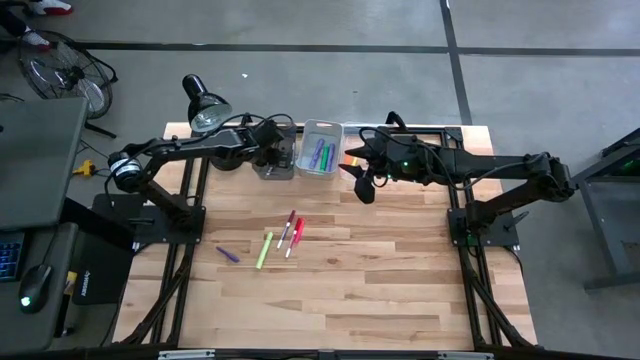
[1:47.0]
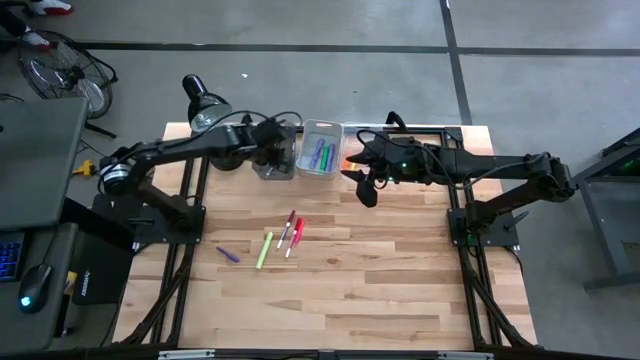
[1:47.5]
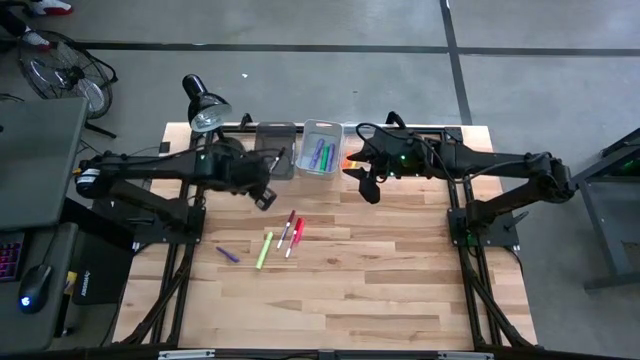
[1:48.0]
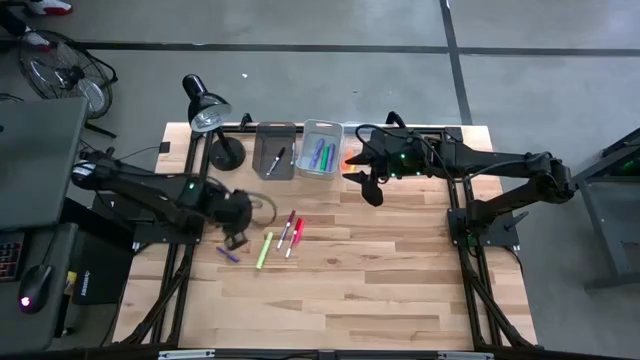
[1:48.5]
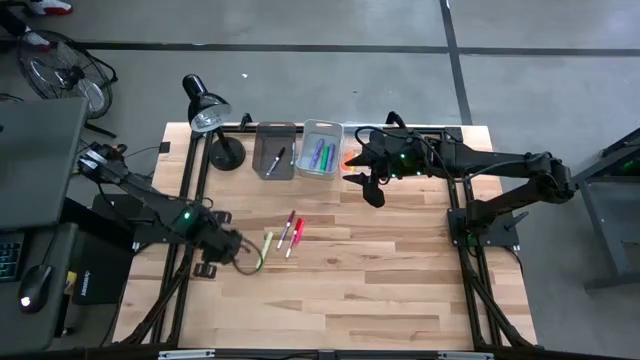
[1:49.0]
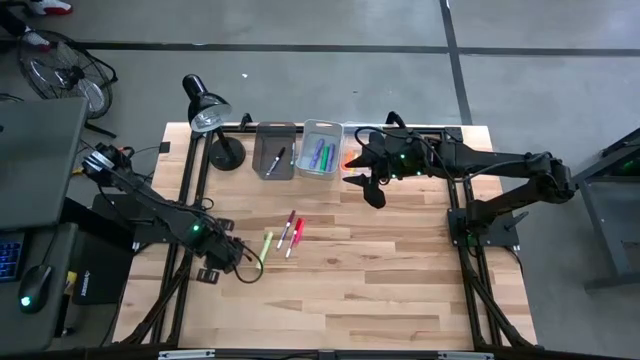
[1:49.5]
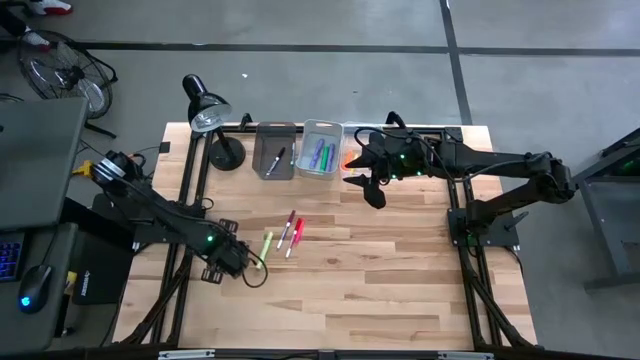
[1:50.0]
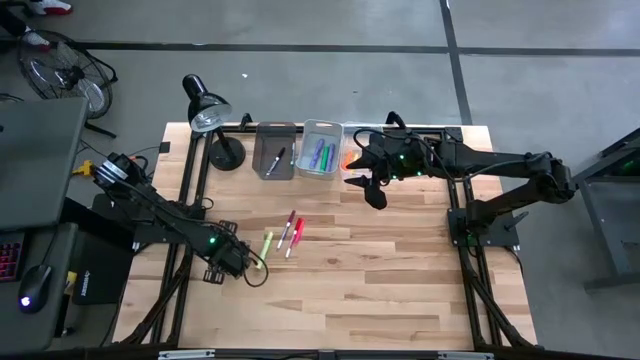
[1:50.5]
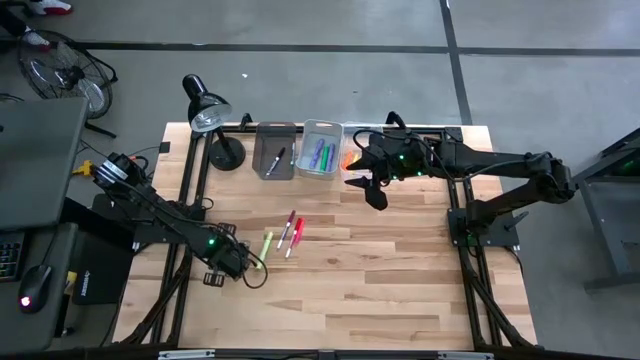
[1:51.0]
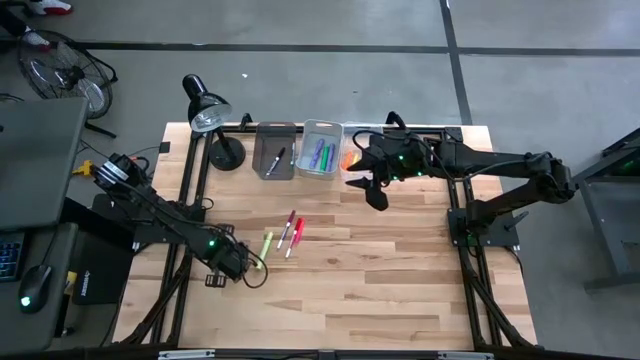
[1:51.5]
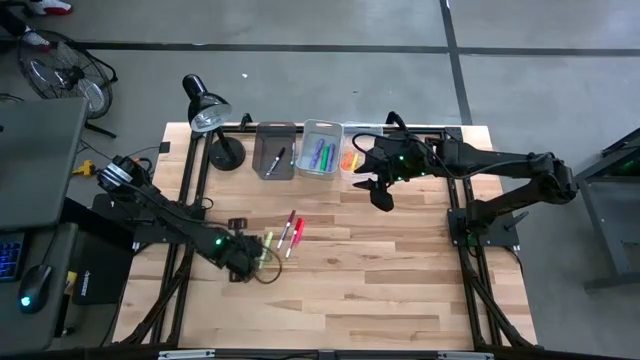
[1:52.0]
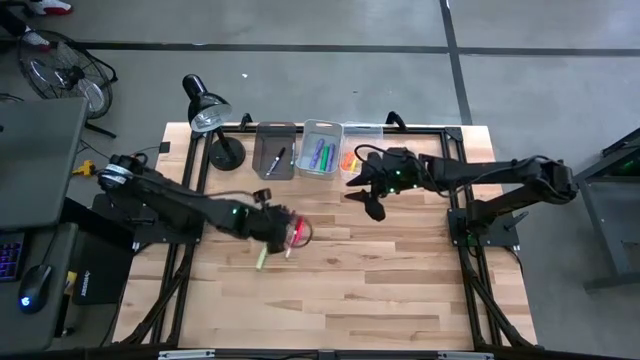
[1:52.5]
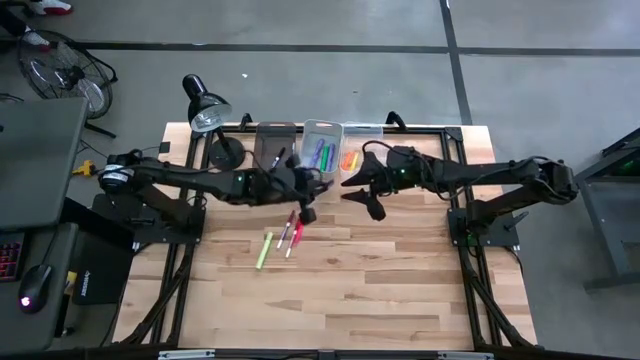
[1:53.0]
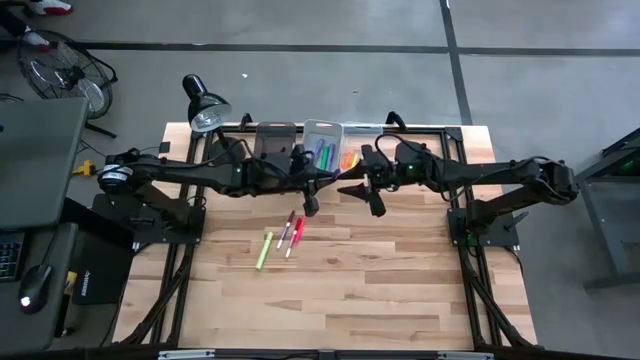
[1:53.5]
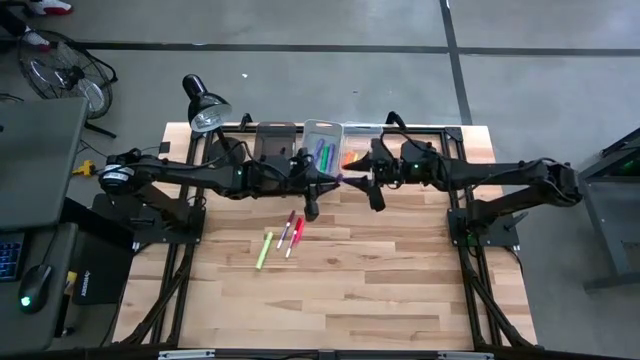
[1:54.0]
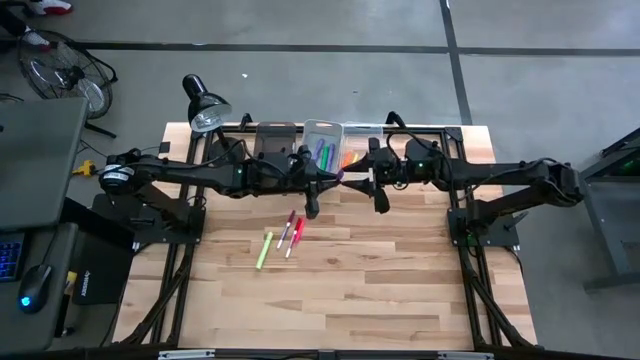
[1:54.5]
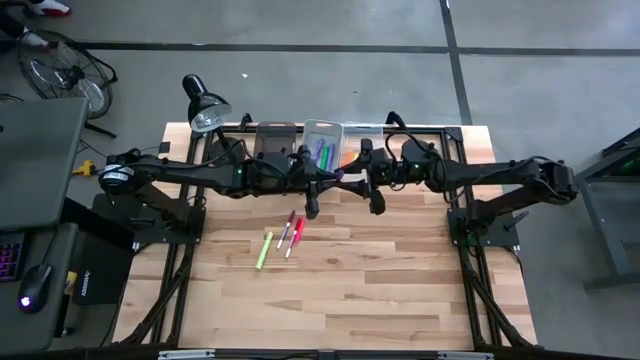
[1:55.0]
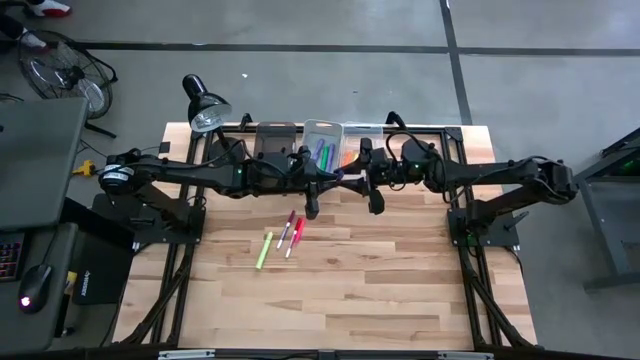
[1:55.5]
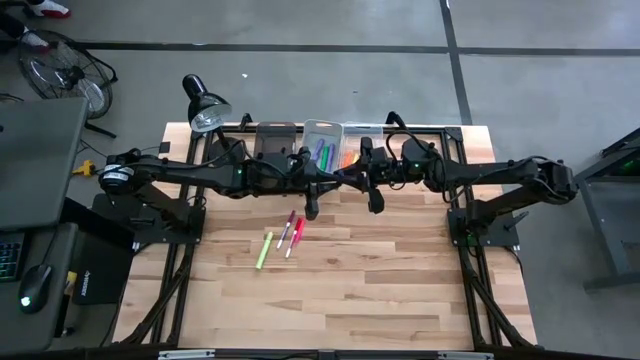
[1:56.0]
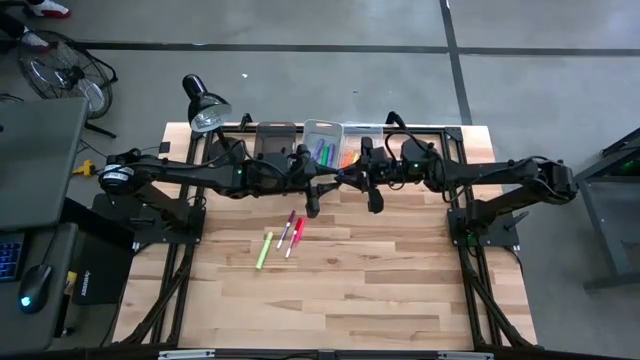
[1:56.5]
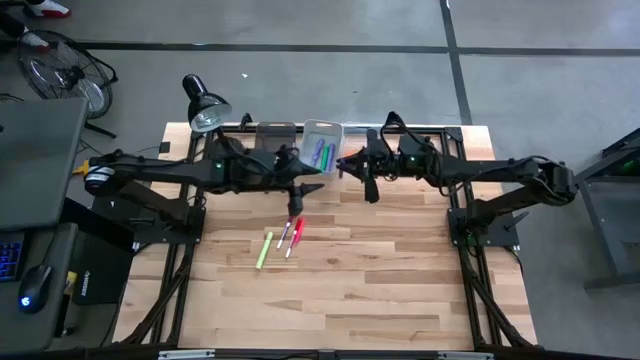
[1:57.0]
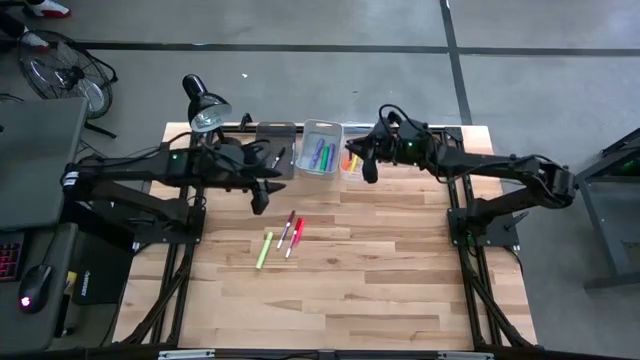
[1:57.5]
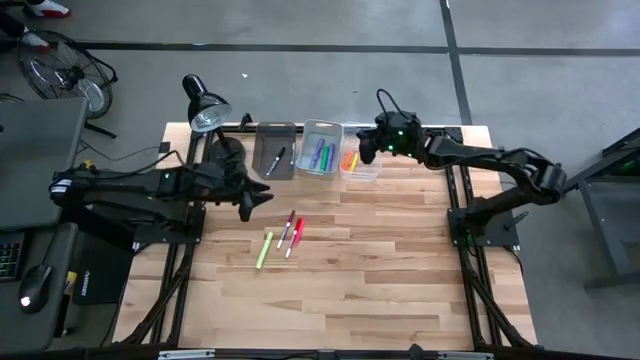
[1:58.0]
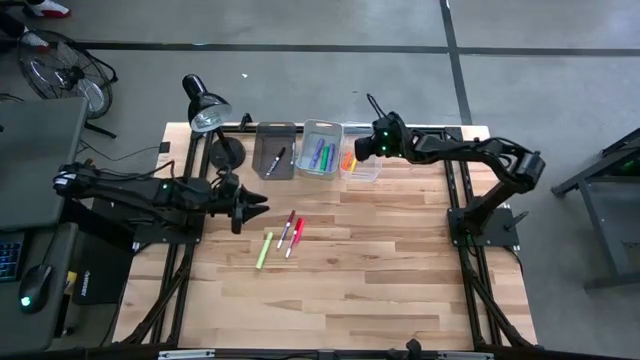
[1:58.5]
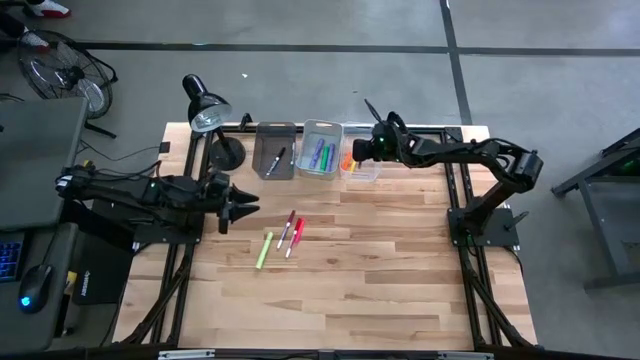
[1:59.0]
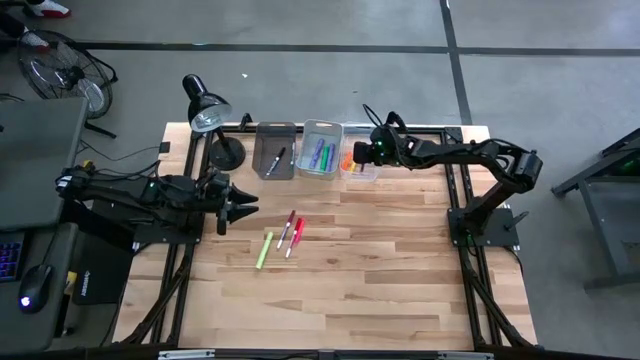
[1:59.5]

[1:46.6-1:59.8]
Task: Pick & Place Markers
Put the violet pen into the transparent bin

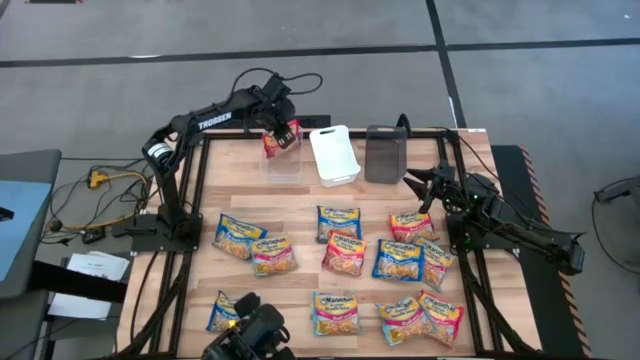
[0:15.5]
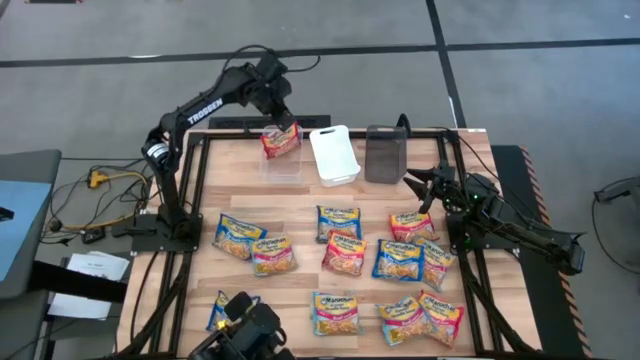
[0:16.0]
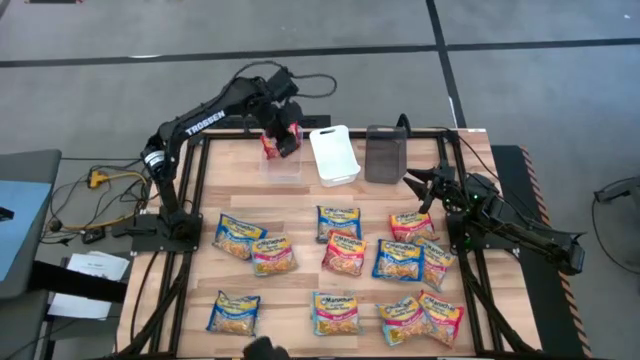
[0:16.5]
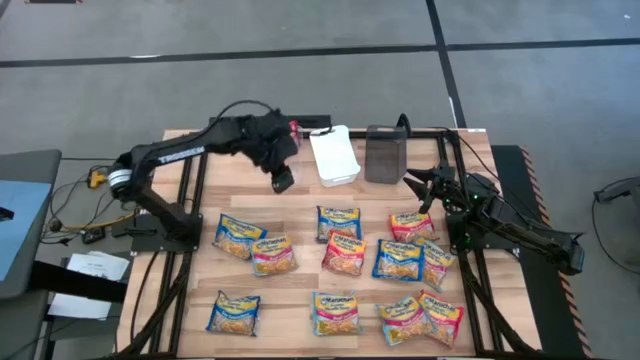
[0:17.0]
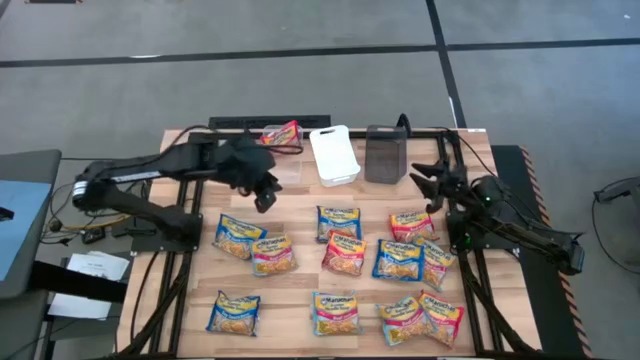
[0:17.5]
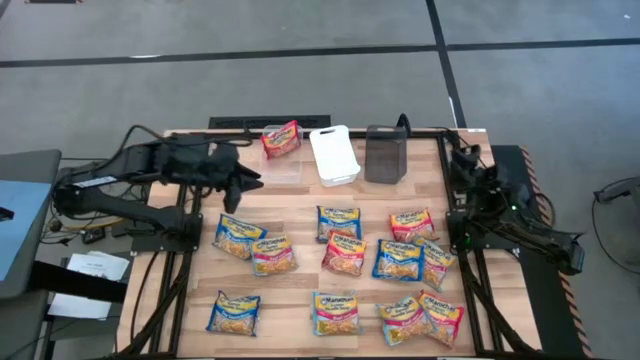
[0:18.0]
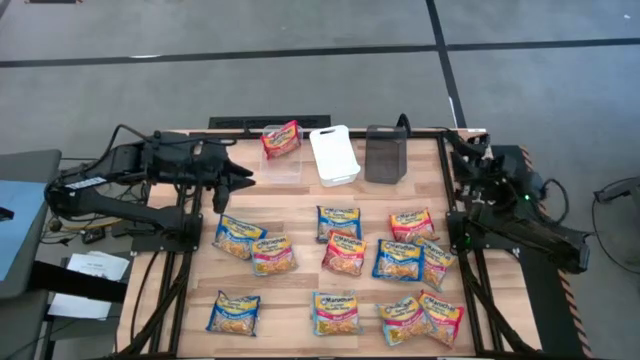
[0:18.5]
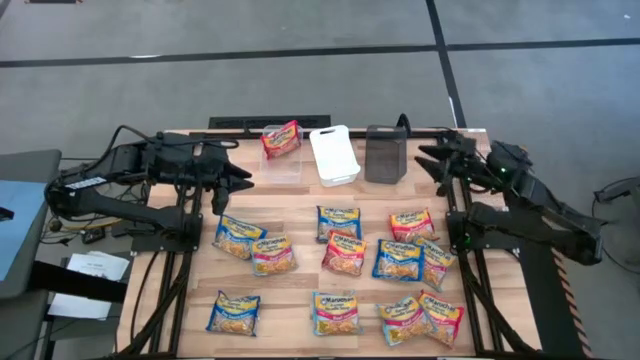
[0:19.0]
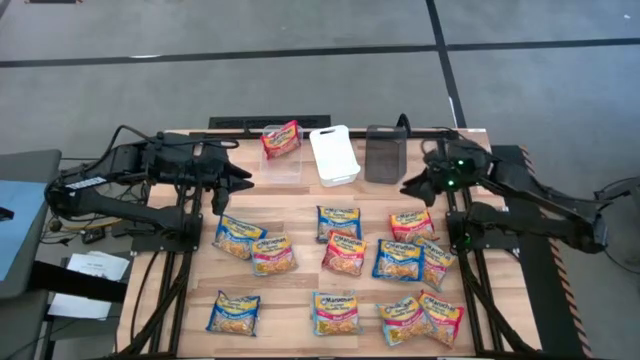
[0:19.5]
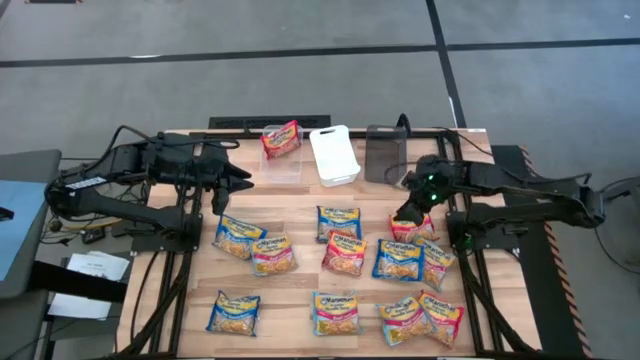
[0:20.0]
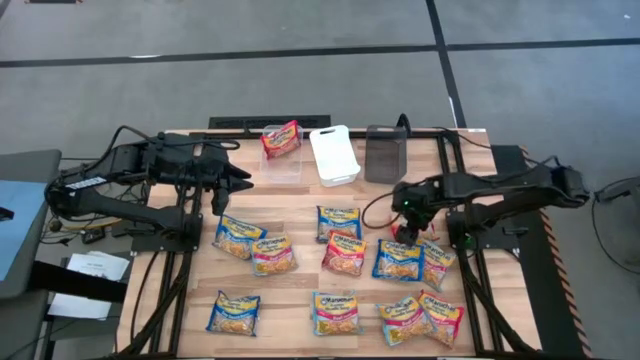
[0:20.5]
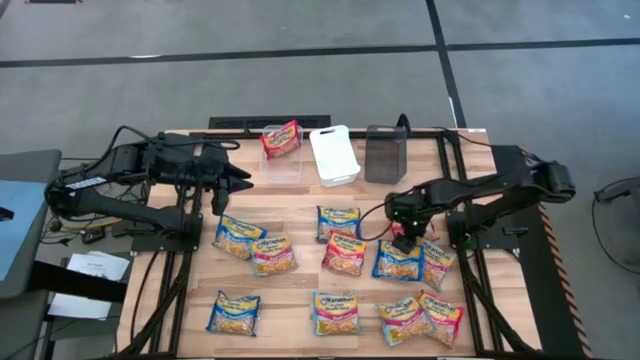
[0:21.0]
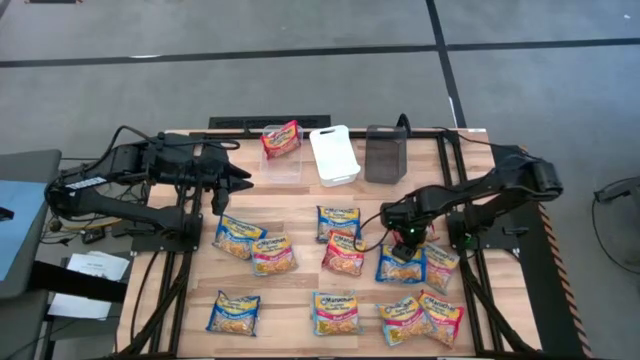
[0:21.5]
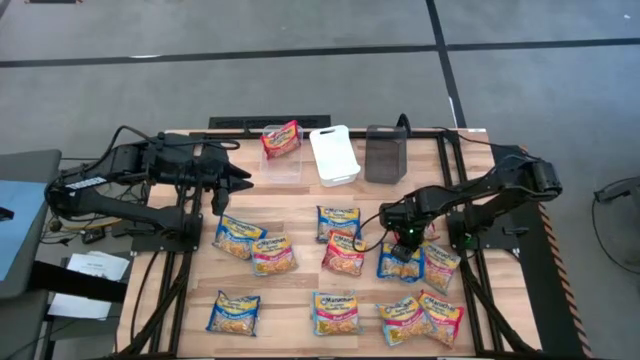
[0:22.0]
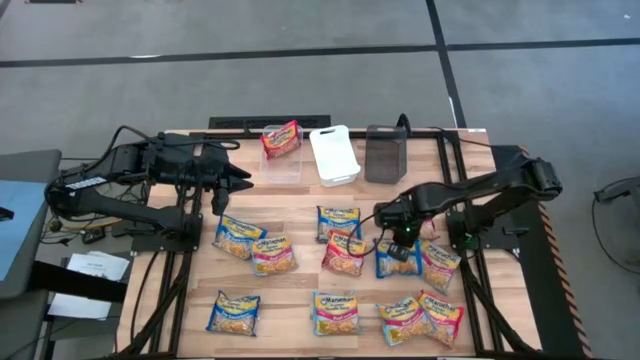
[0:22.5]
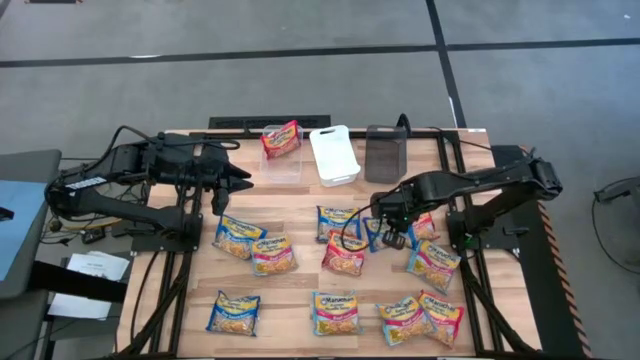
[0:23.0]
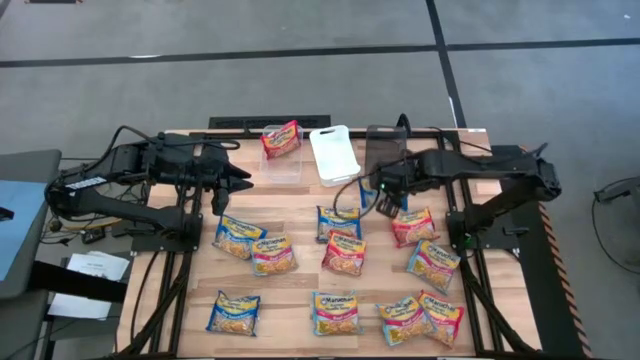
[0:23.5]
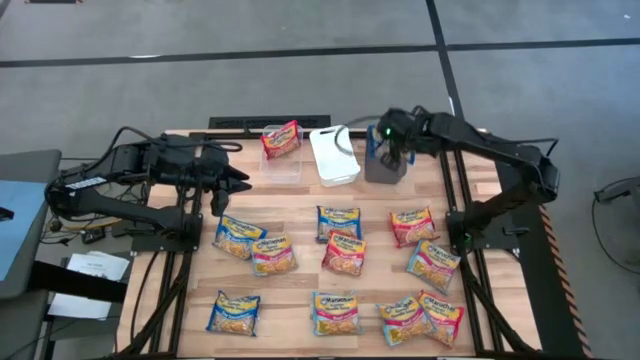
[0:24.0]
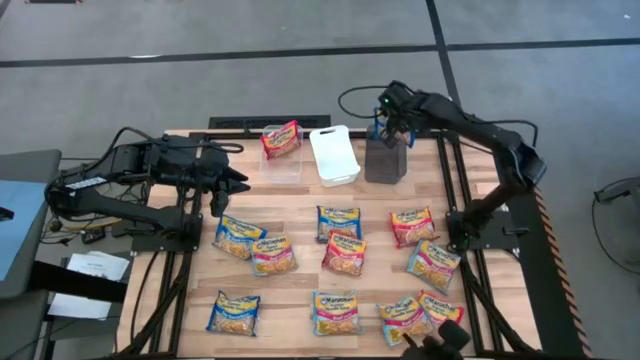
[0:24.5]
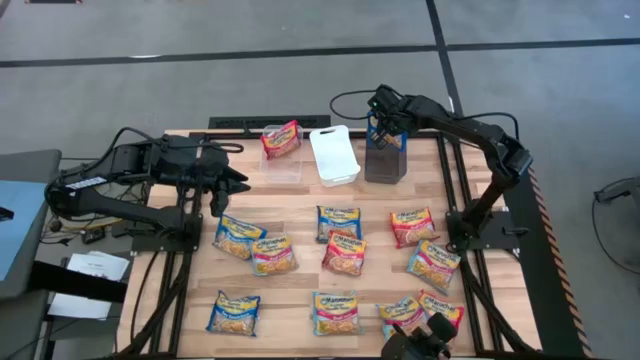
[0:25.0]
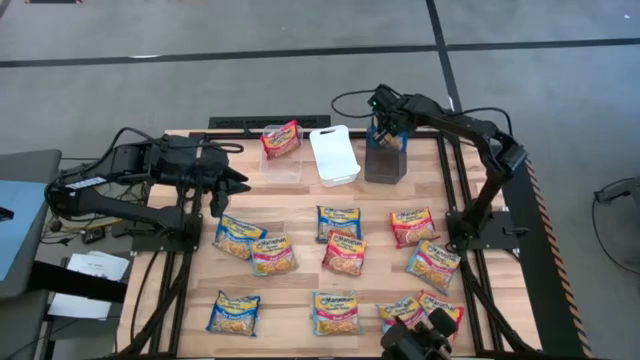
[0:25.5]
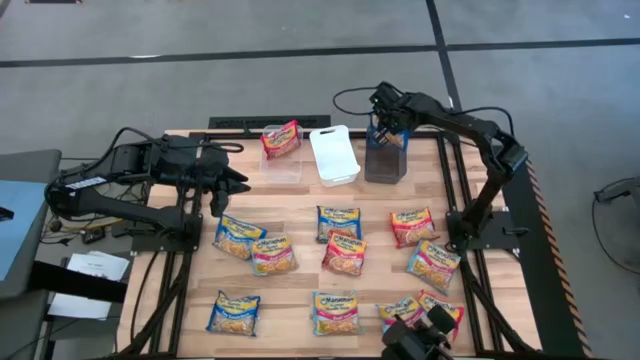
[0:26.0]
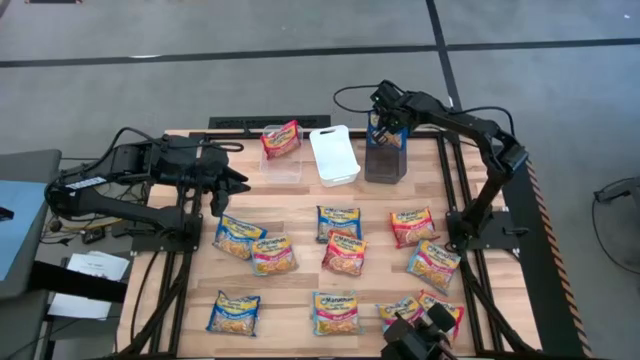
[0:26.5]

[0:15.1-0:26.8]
Task: Sort Maruchan noodles
Put the blue noodle pack into the black bin
